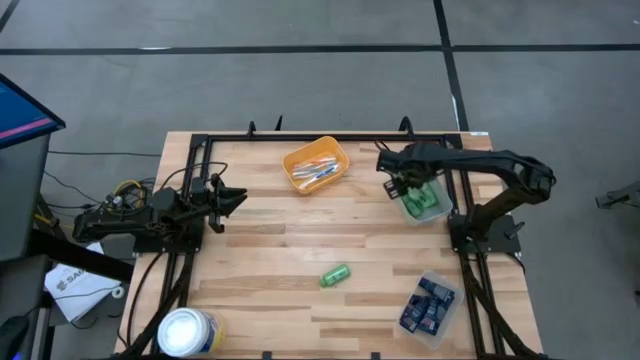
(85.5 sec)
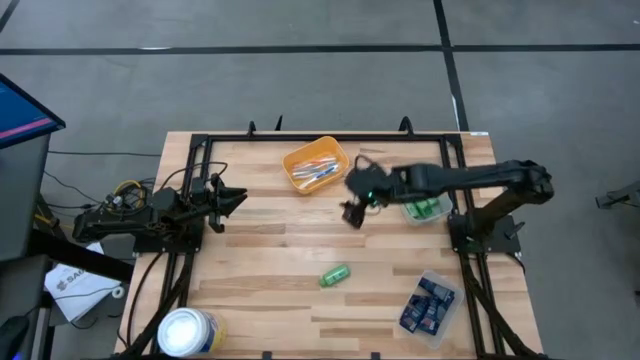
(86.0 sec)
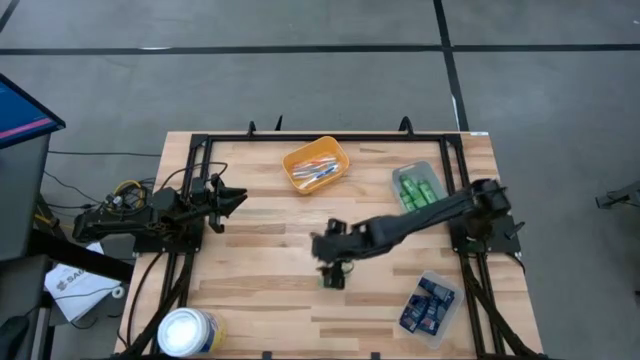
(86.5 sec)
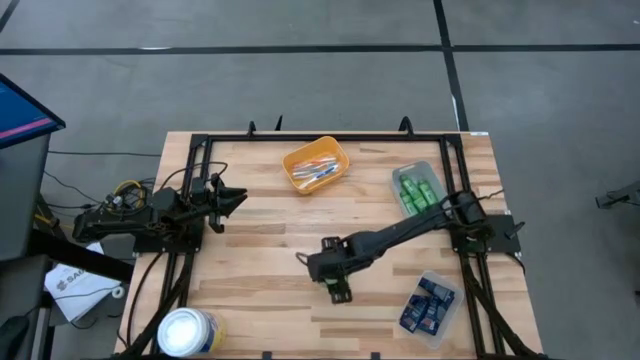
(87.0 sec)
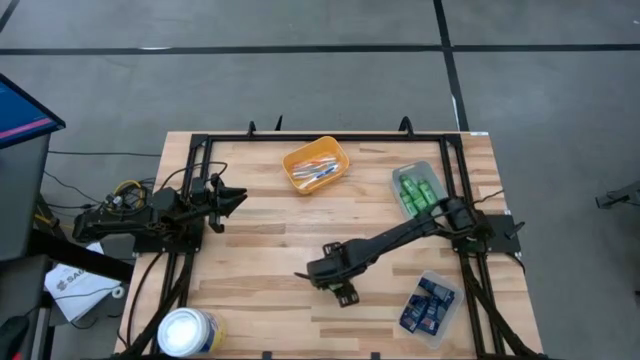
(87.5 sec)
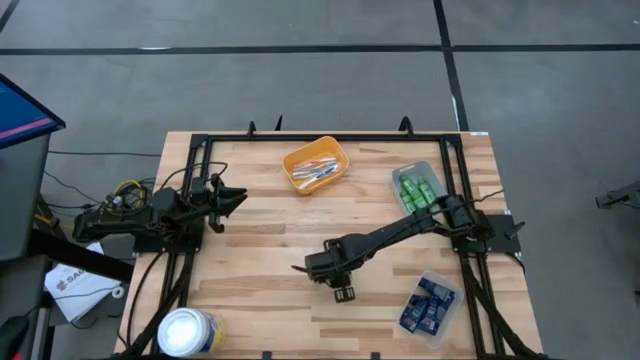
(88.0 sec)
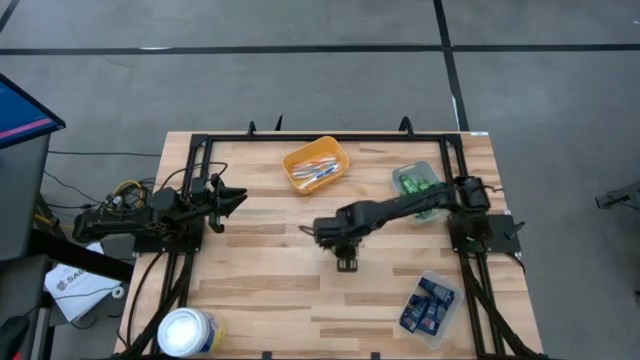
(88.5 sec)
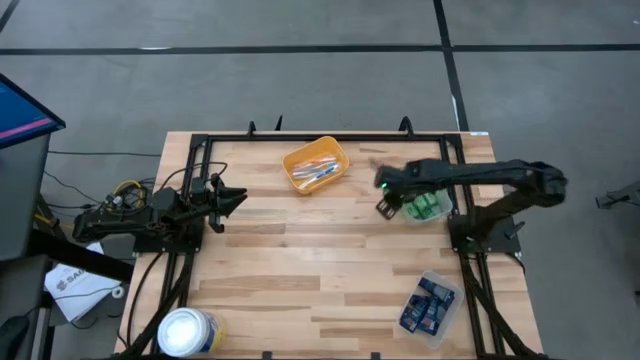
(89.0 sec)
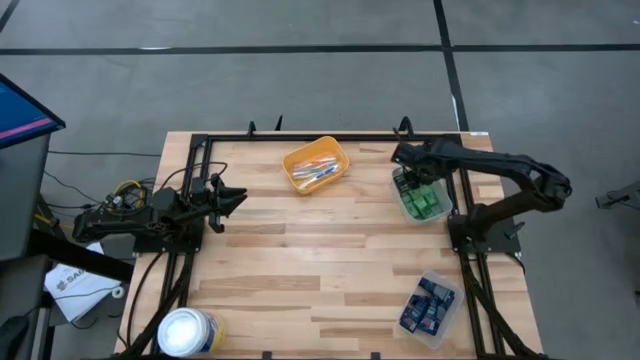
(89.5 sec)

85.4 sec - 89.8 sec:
Task: Pick & Place Travel size toiletries
Put the green shampoo bottle into the gray bin

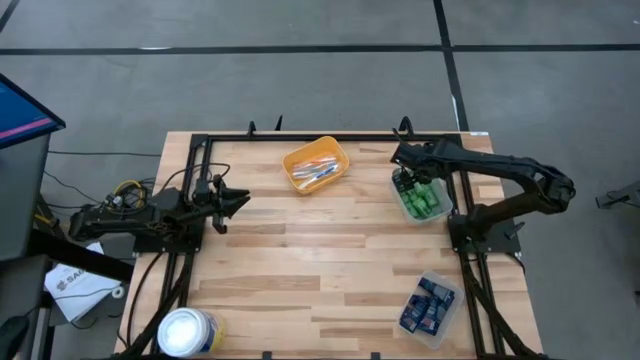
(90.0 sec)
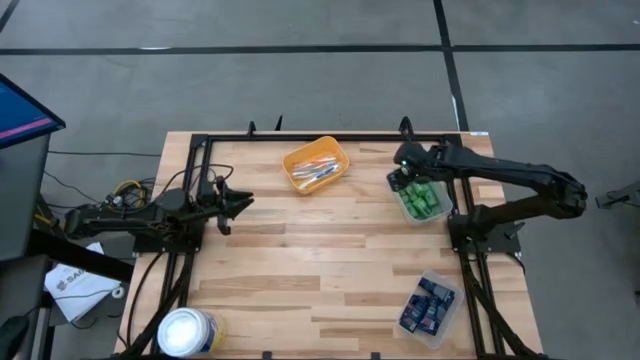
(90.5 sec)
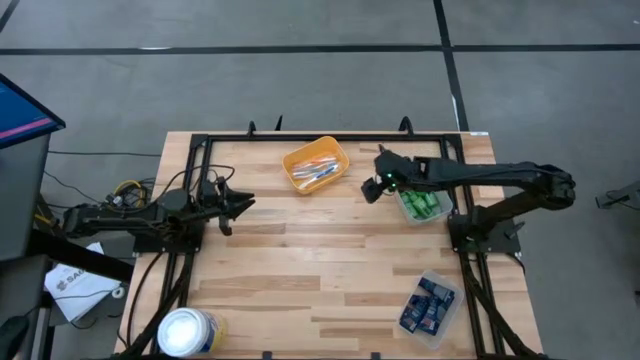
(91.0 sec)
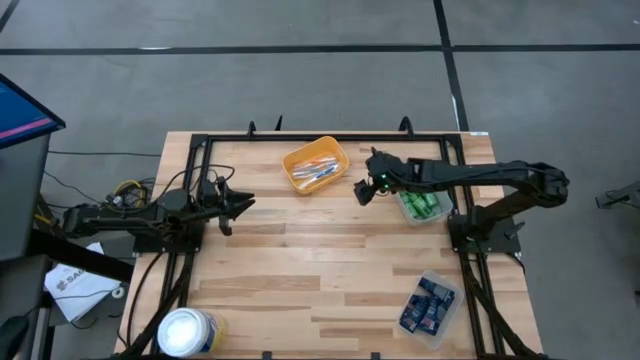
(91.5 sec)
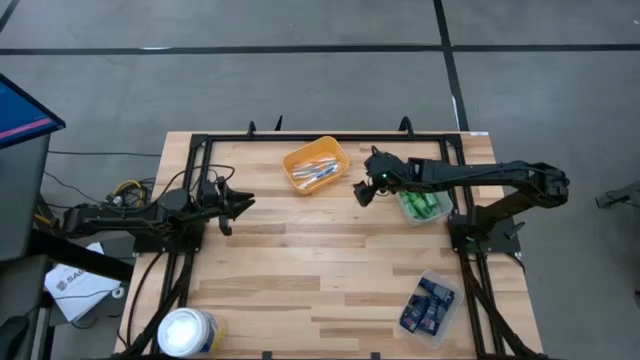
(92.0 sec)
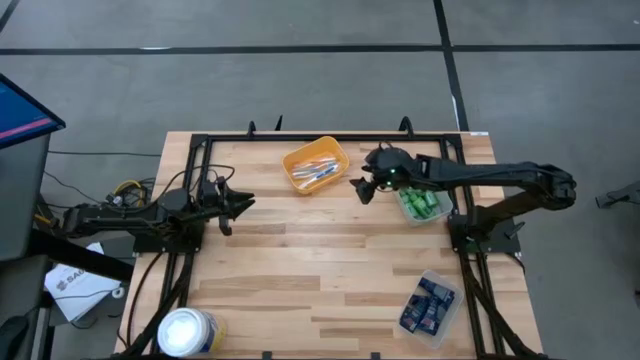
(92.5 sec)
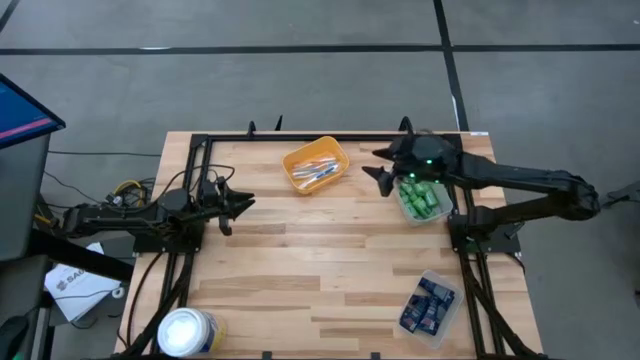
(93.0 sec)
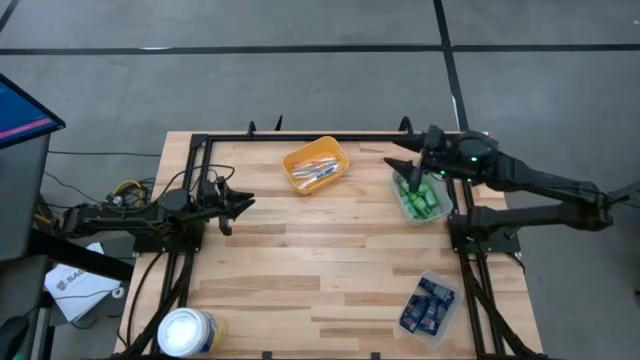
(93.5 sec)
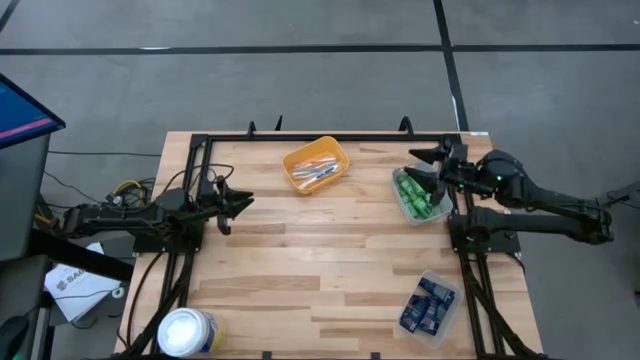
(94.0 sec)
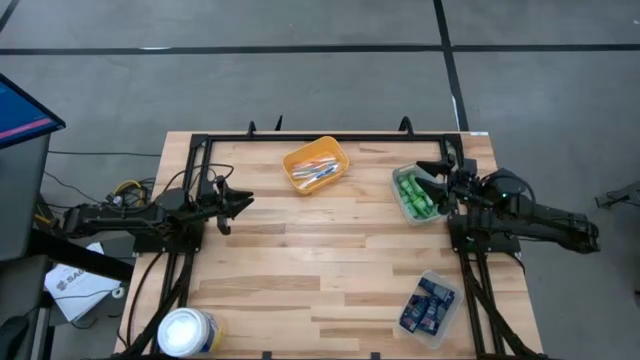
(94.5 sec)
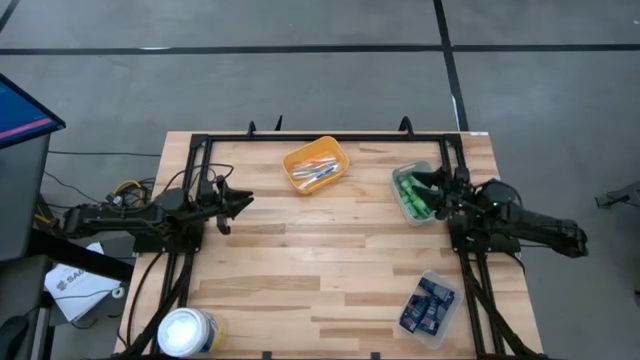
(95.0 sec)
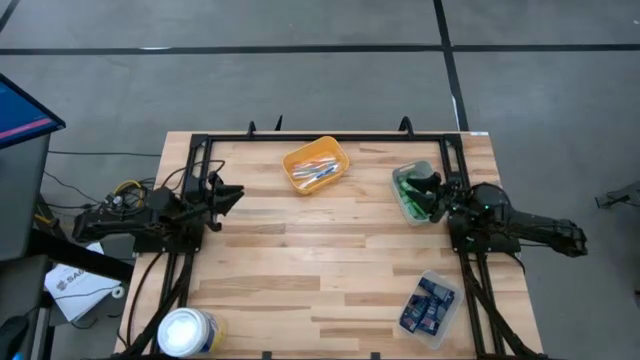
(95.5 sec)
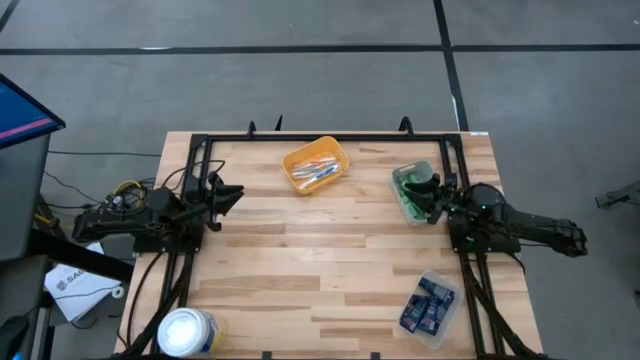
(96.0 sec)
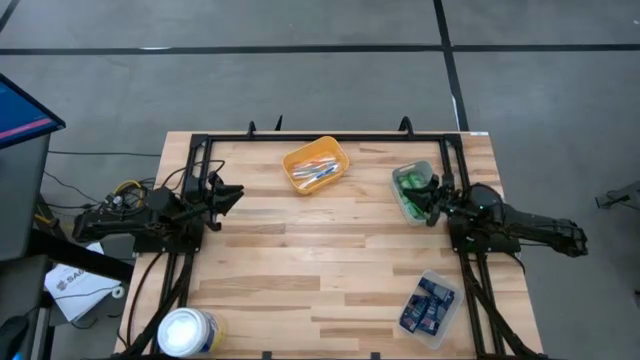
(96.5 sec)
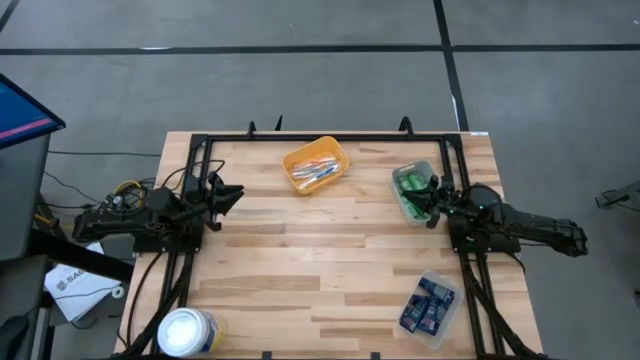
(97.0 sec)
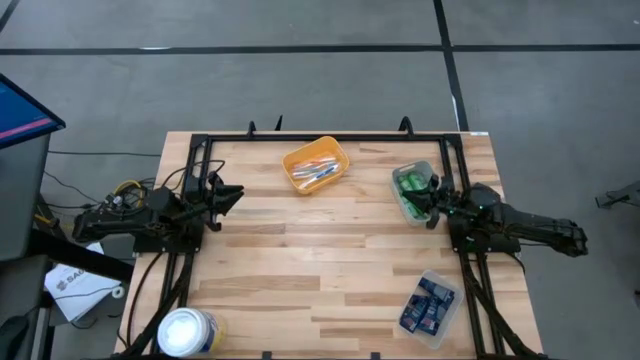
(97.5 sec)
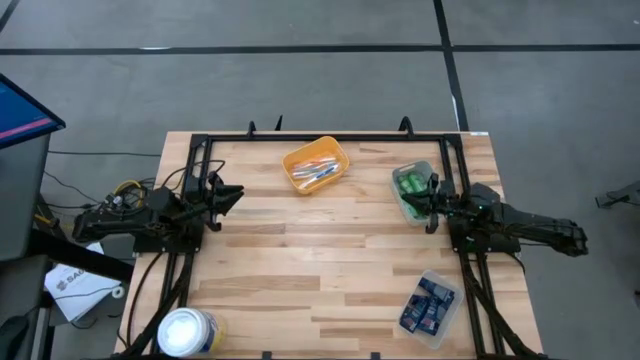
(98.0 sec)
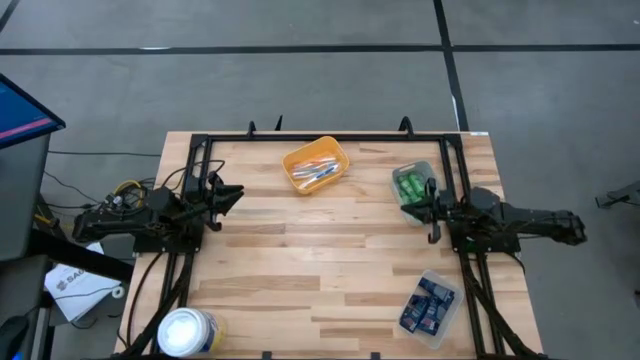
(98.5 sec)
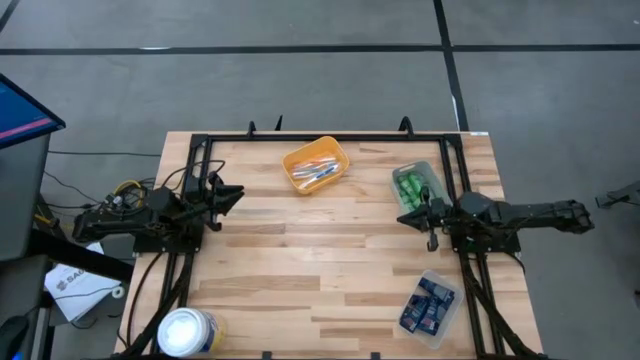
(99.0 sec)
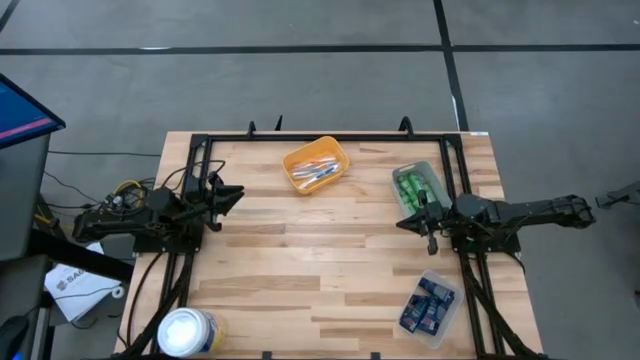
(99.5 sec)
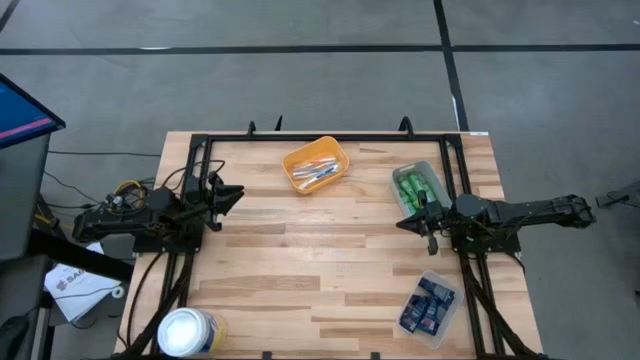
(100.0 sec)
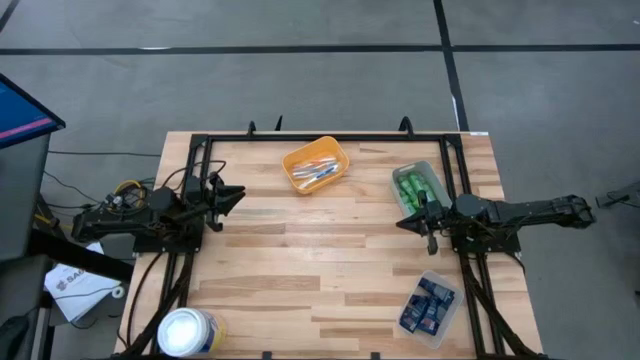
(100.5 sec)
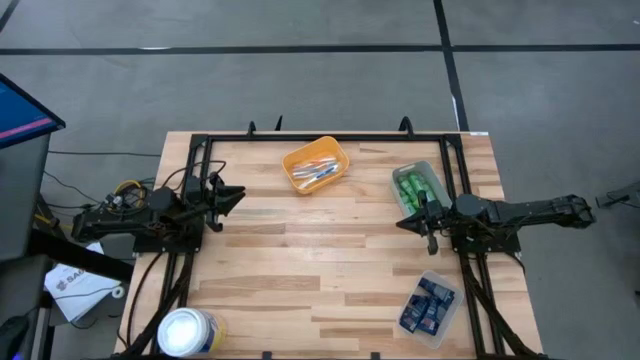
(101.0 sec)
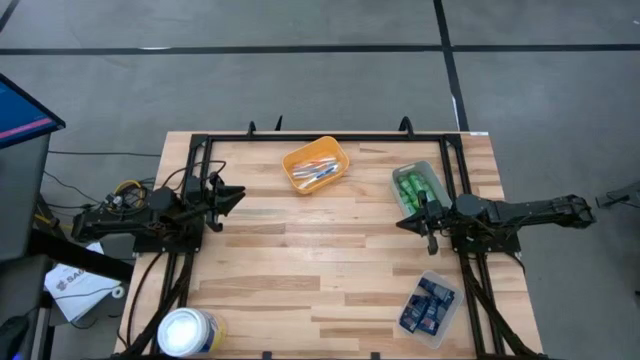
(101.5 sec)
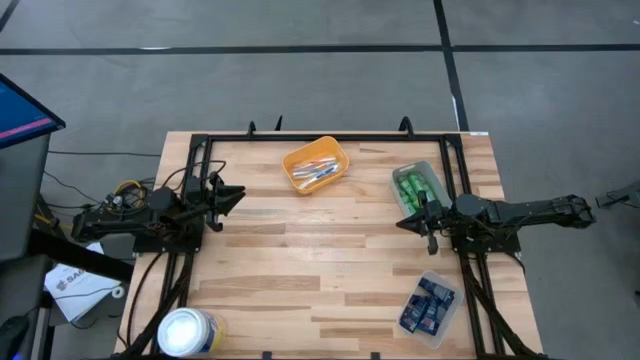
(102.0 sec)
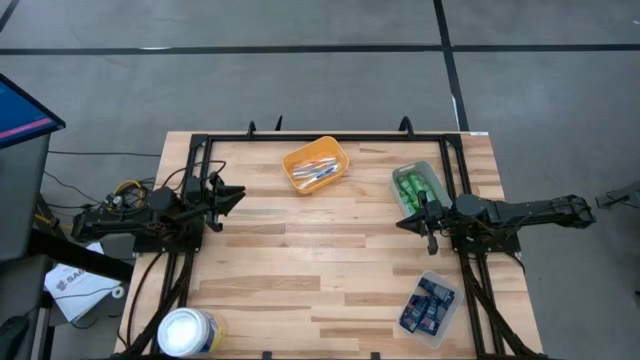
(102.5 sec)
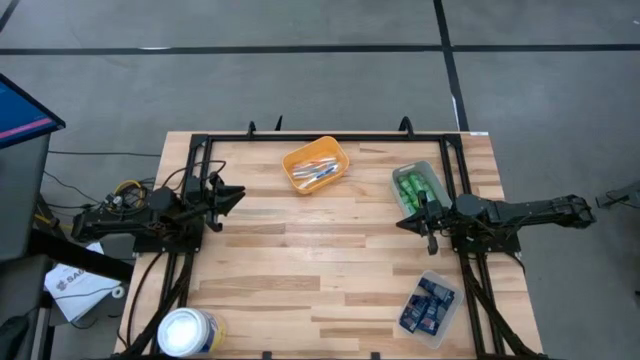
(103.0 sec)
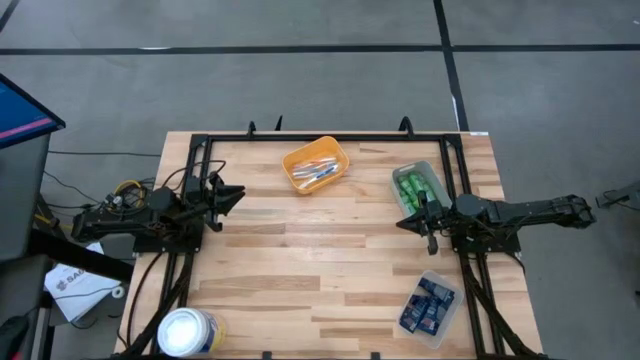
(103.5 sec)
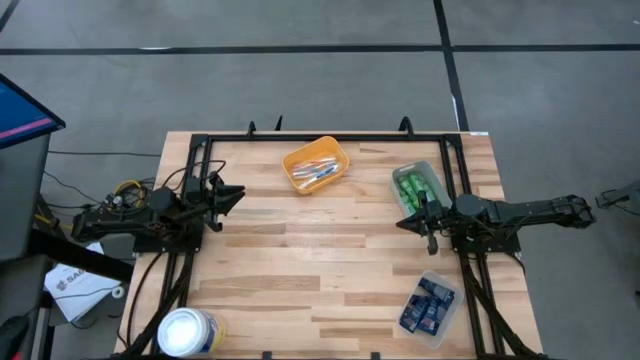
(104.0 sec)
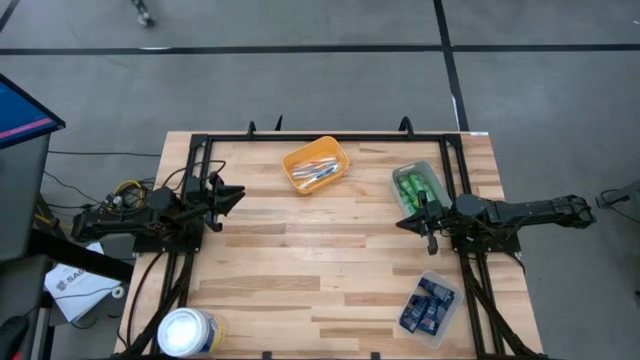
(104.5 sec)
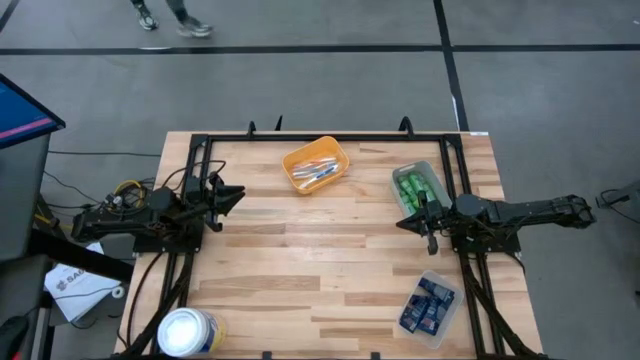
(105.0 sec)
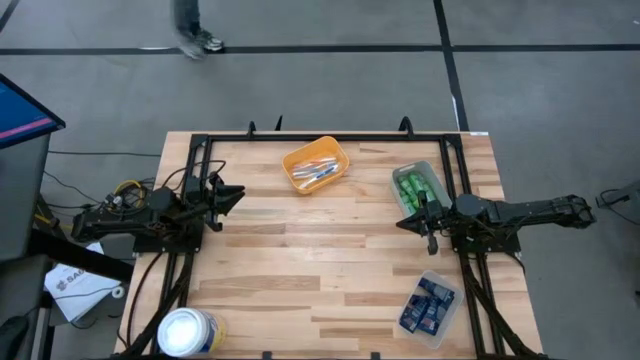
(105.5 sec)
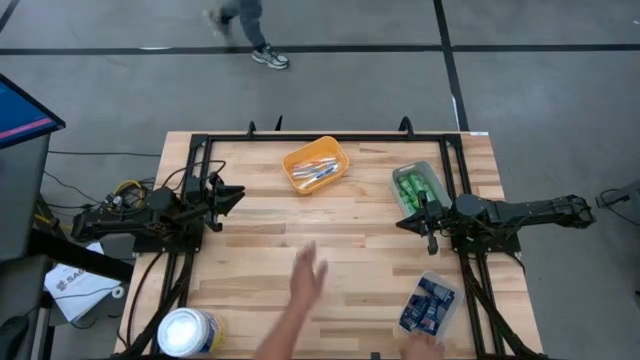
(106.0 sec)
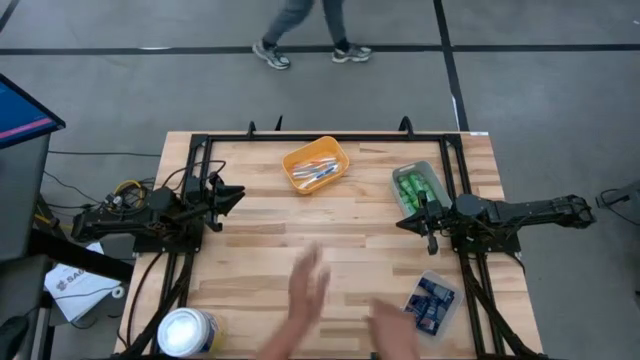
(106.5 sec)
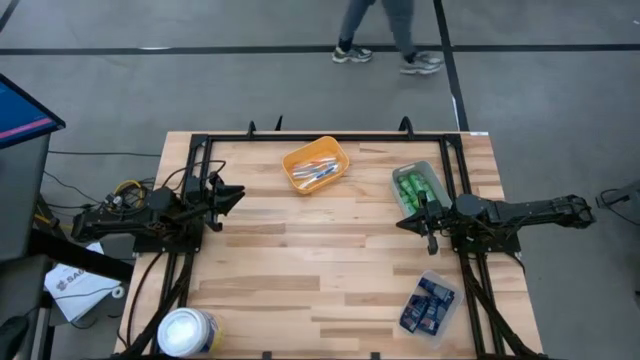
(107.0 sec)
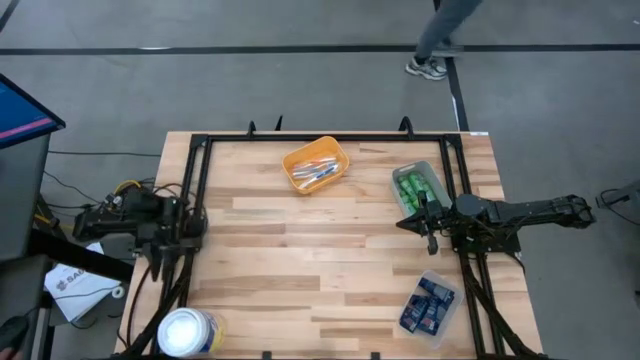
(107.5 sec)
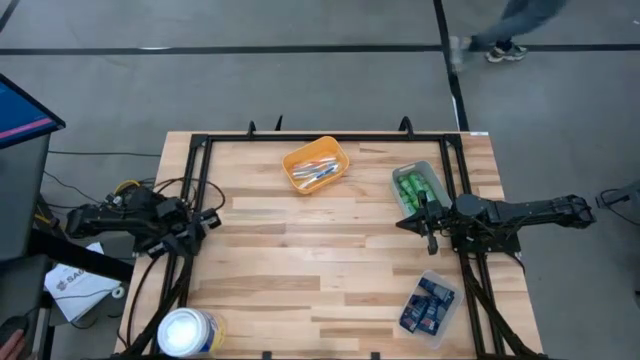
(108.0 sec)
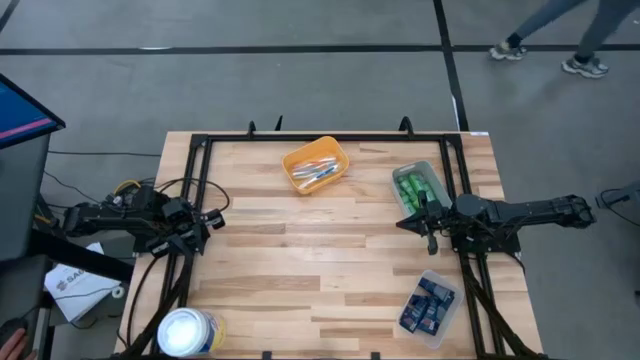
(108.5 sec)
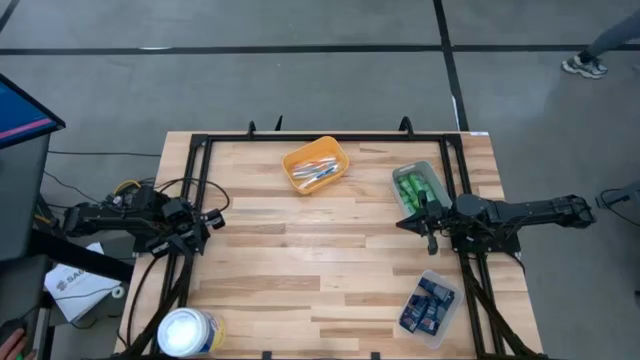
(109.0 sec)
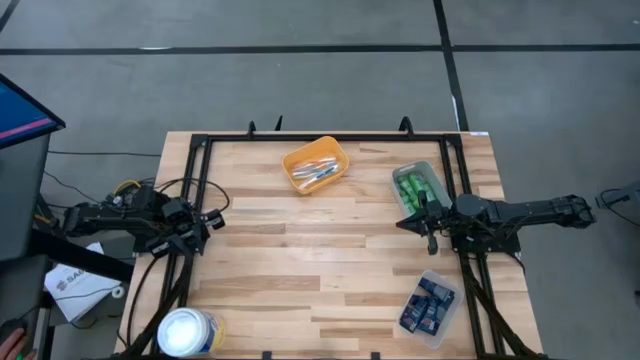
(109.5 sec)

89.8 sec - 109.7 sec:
Return to Home Position
